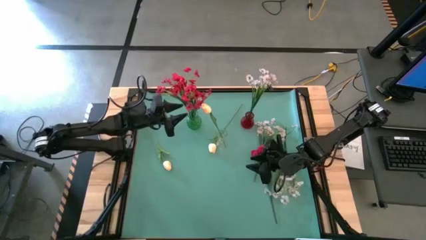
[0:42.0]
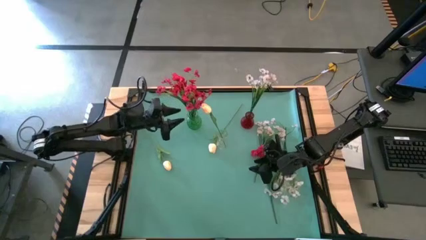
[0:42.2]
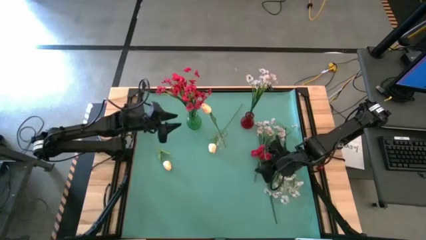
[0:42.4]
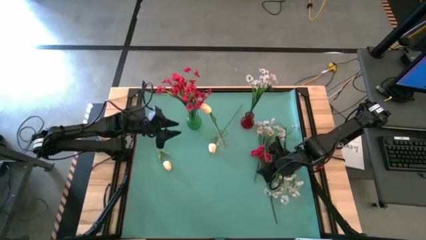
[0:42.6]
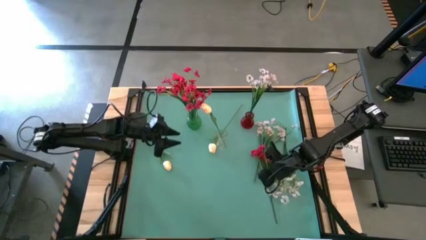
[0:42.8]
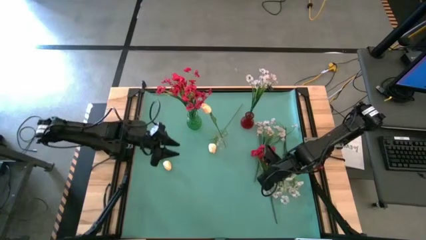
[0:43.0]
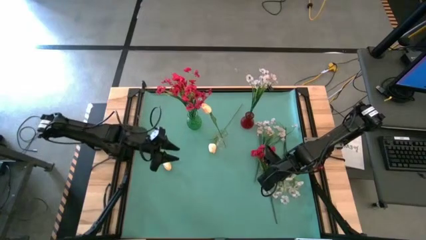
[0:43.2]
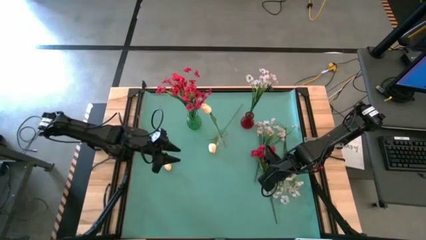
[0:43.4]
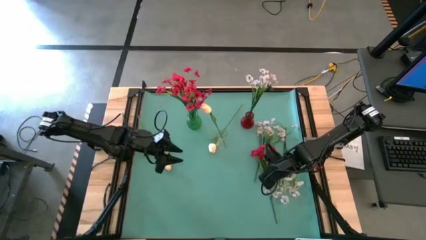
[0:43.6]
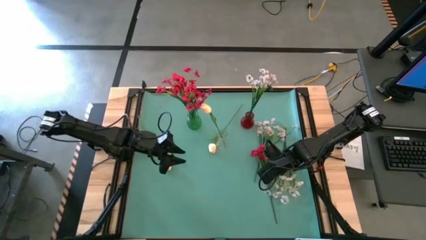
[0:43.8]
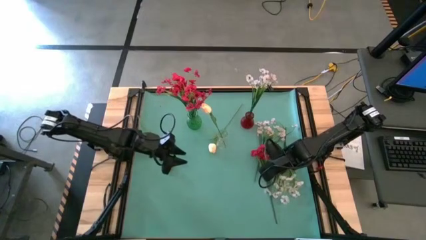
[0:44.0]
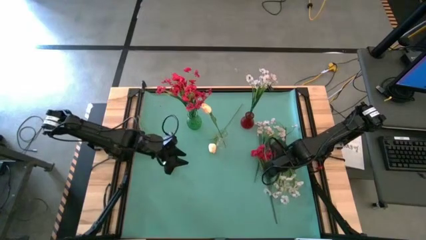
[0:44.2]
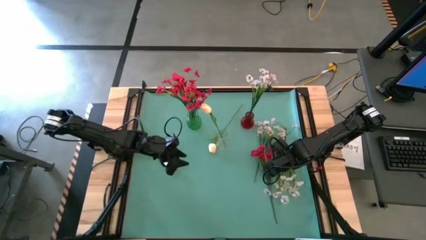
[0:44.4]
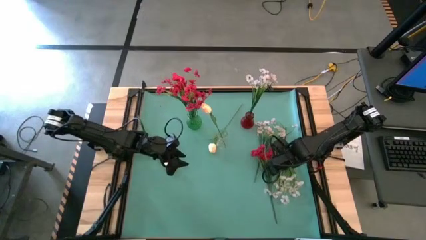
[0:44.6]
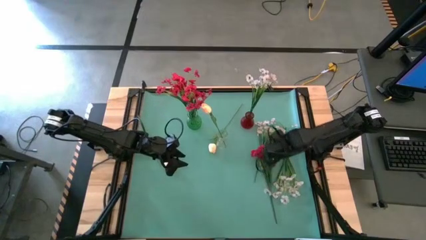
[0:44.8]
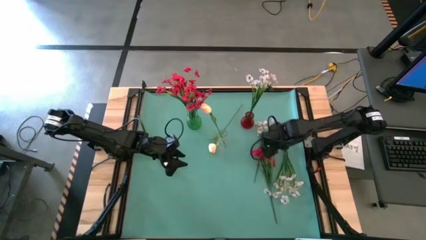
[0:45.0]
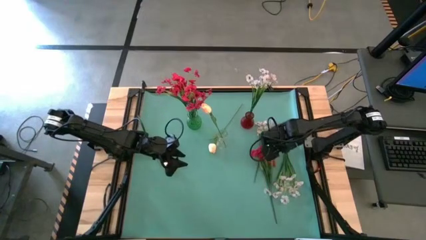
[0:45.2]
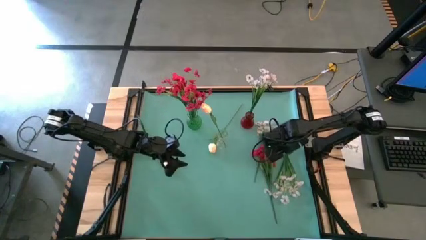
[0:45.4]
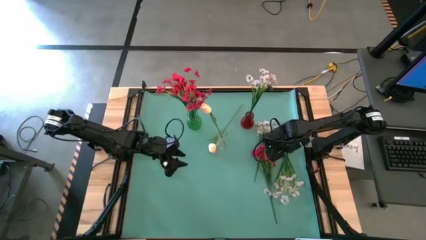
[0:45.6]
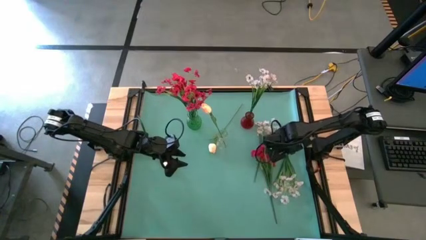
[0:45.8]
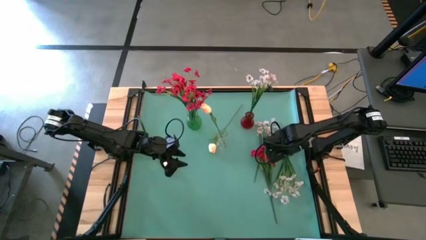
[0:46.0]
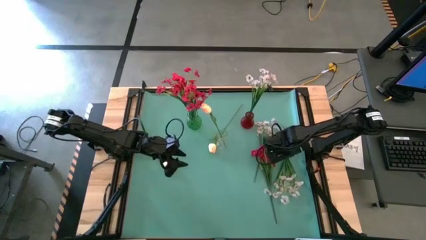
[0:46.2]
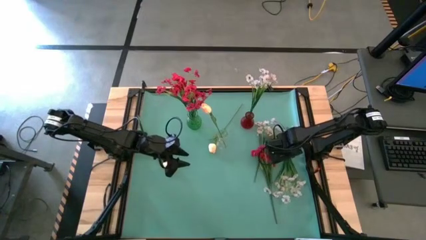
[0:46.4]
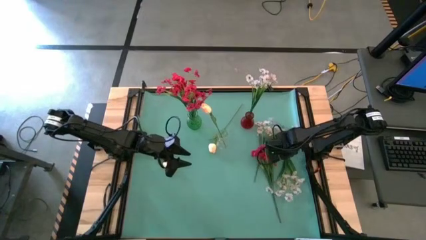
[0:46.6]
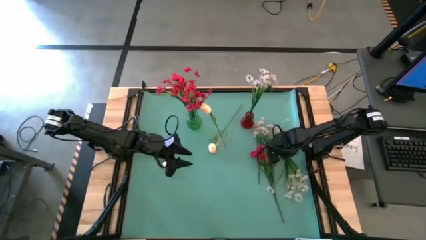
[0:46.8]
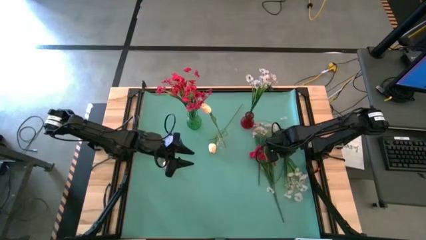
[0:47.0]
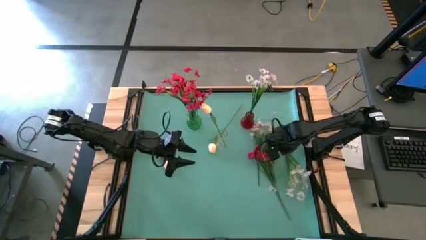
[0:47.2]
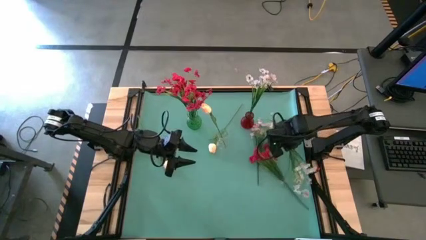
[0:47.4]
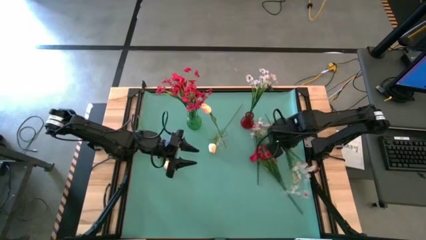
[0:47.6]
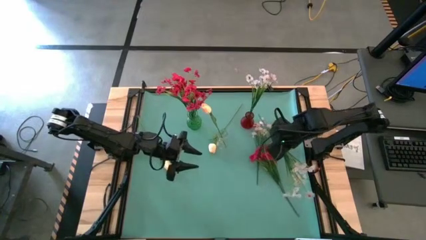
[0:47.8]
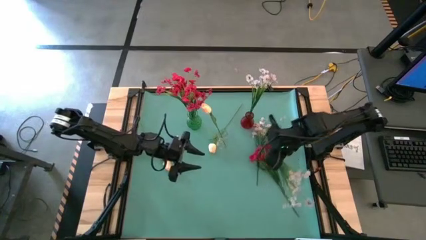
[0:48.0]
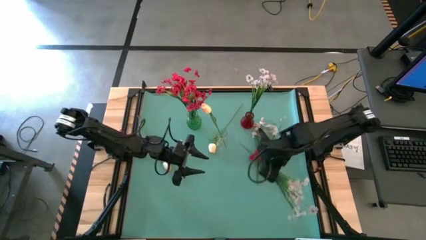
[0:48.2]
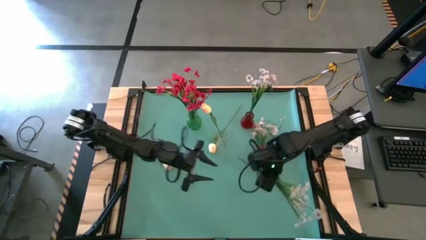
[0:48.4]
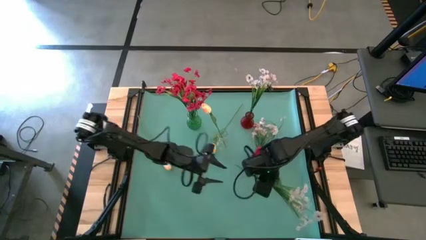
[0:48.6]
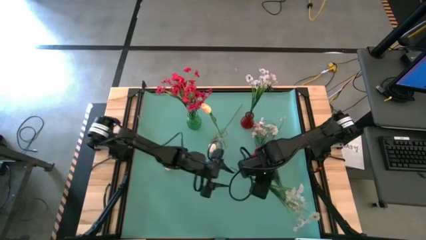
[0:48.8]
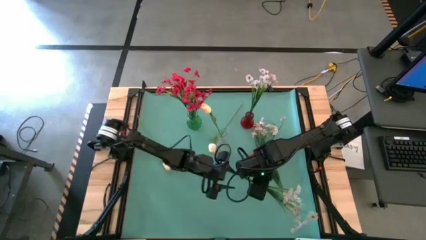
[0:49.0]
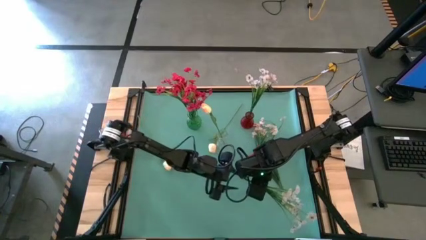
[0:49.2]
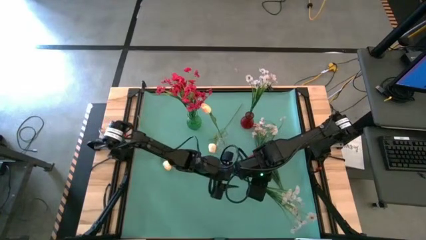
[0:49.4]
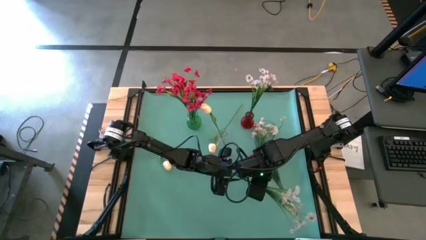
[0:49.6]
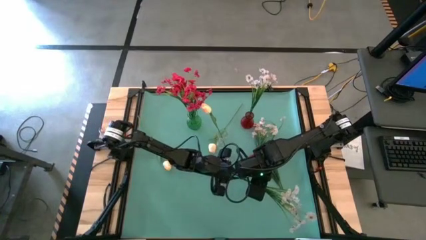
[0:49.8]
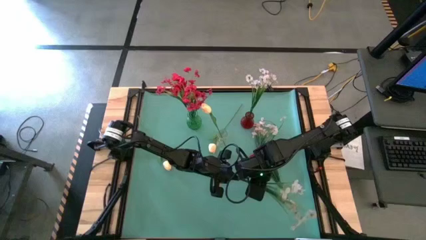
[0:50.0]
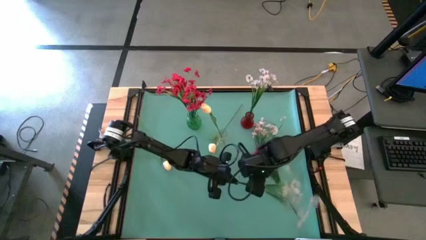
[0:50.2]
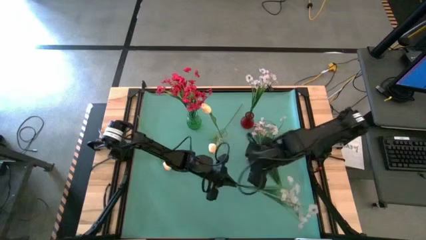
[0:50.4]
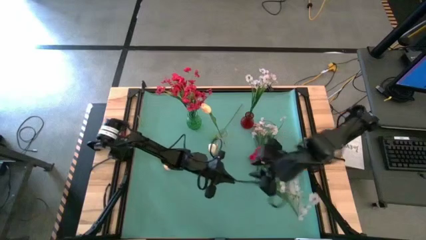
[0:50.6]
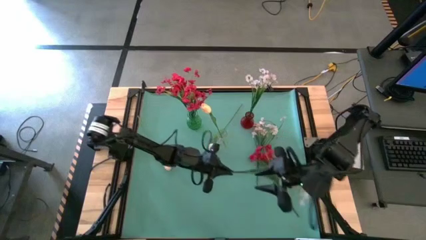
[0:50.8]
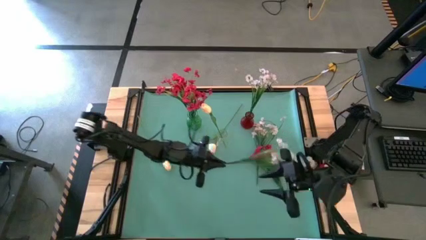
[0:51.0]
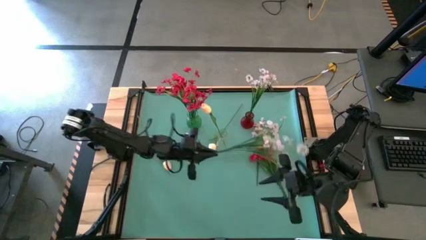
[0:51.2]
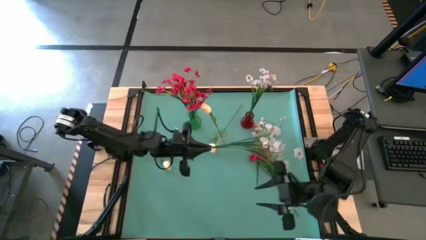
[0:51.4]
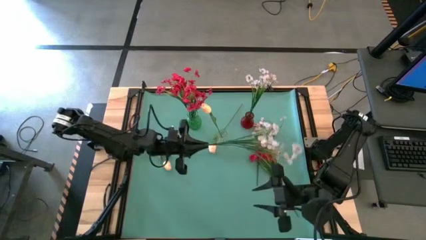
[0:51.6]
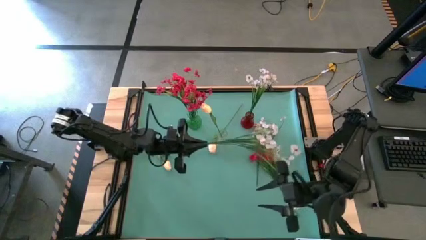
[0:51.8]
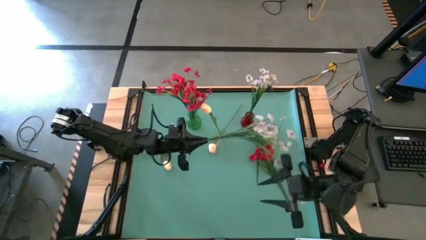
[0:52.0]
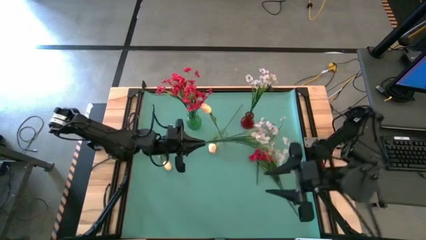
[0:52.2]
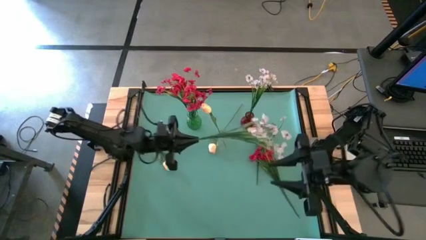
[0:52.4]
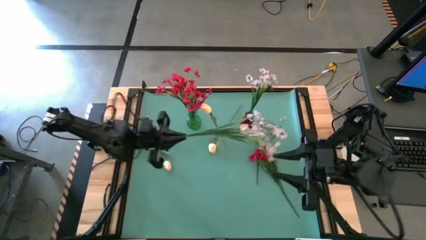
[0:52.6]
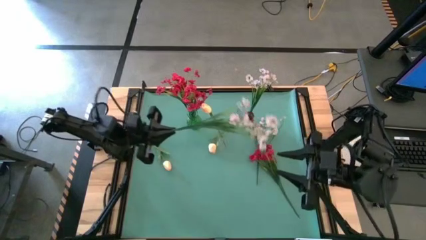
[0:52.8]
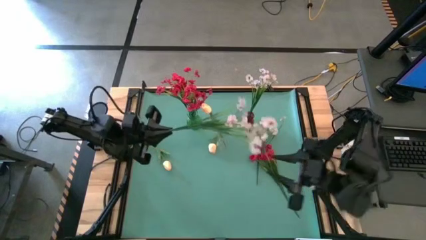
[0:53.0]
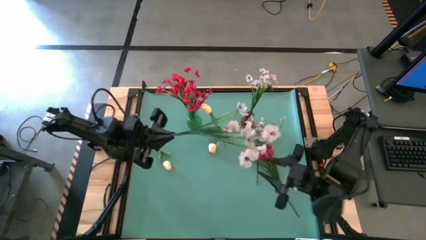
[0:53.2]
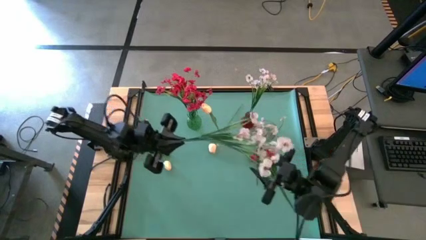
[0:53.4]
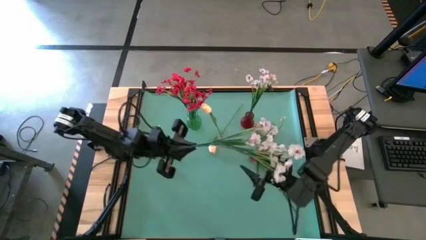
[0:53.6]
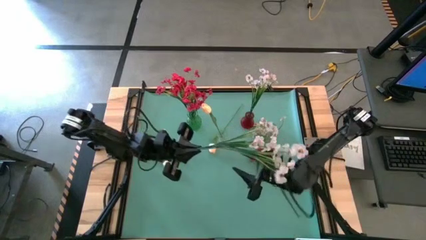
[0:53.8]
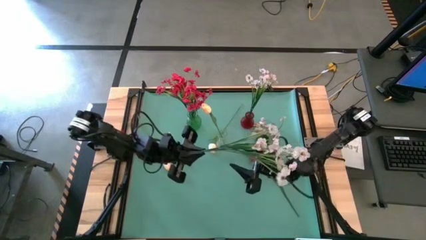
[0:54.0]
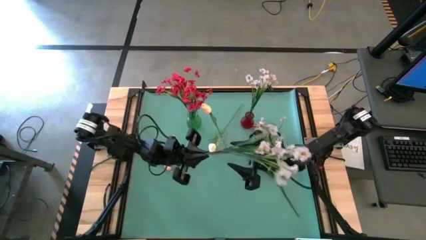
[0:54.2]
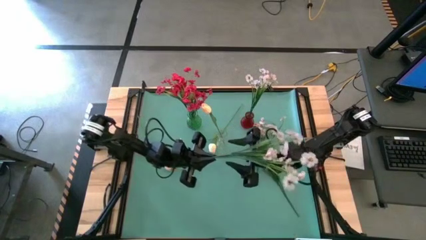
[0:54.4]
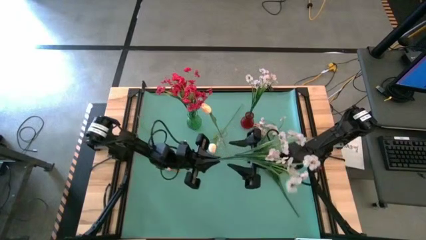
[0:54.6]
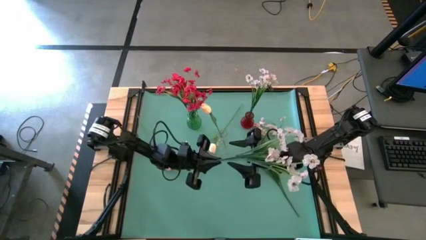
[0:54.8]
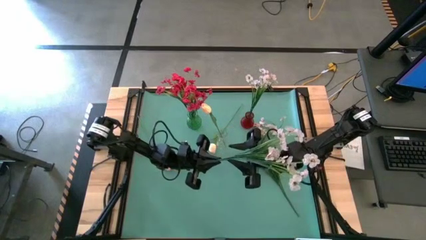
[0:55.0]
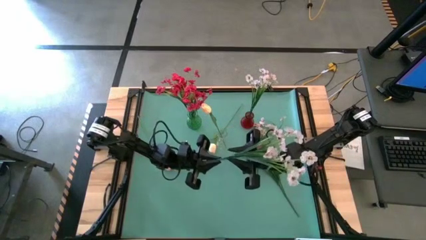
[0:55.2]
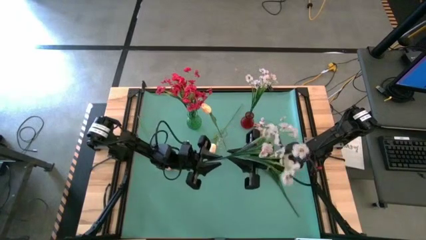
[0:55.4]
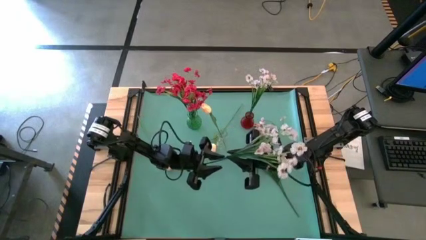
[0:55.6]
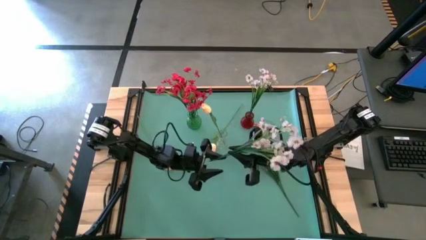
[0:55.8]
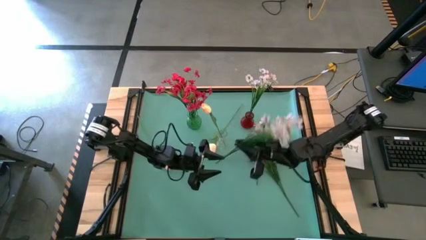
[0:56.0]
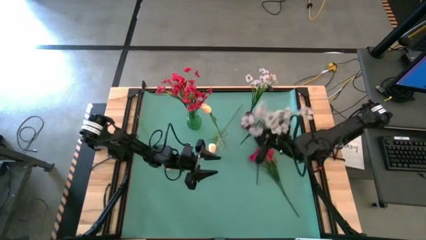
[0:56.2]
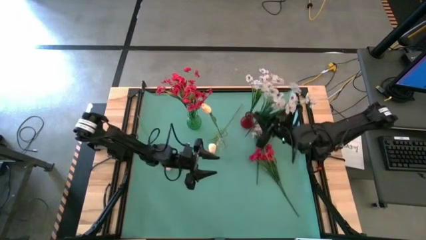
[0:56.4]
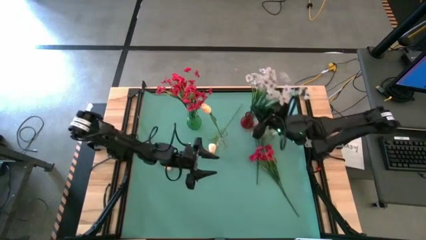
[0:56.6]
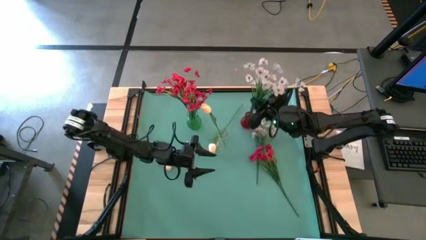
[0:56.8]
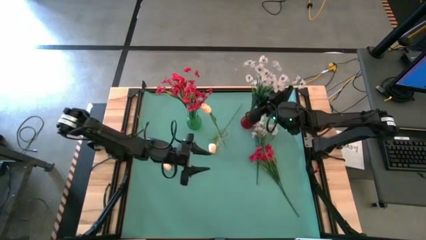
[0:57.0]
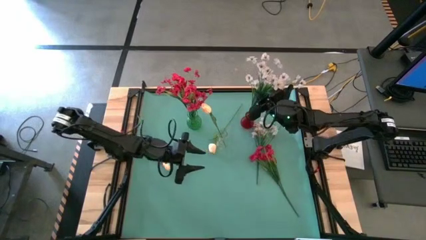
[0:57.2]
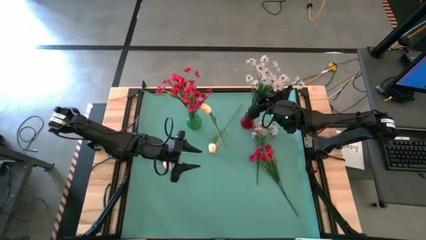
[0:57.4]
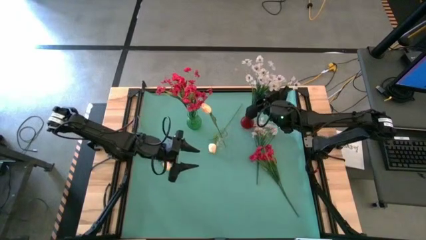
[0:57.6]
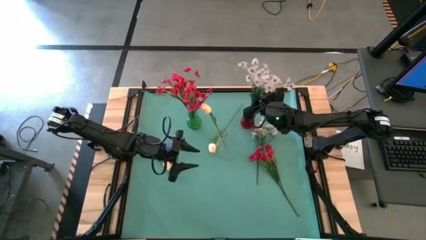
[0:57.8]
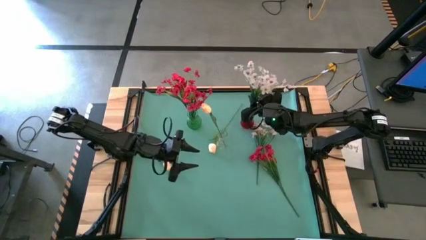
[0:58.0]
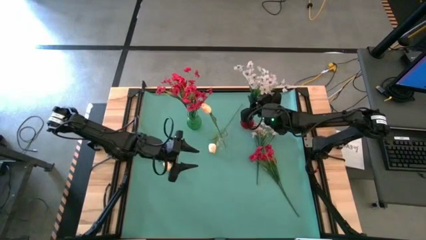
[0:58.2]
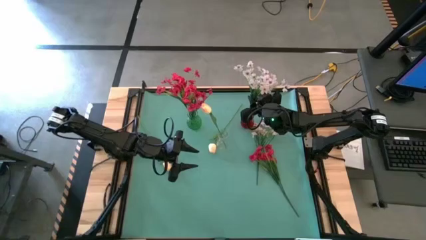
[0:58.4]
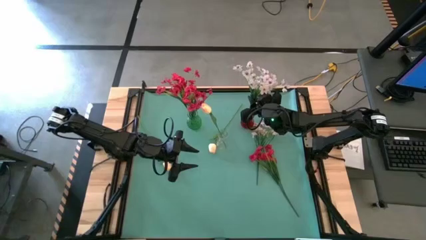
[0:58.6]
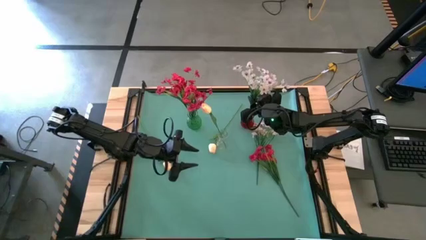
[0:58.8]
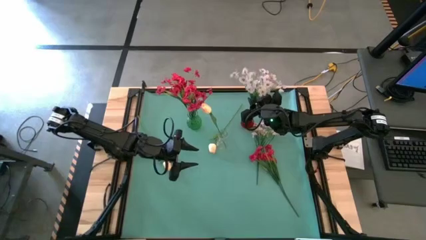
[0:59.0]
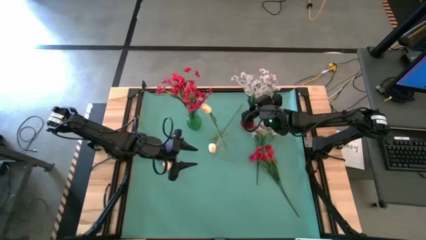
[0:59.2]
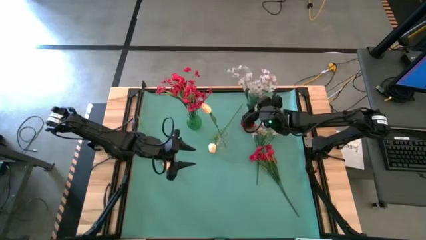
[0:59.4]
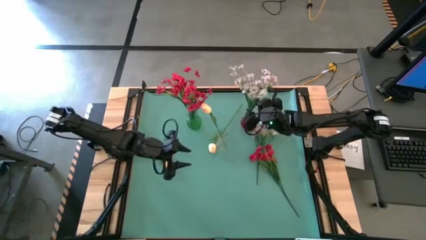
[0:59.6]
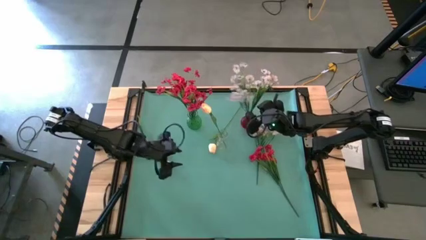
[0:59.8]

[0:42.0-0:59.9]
Task: Sort flowers into vase by color
Put the right white flower into the red vase
